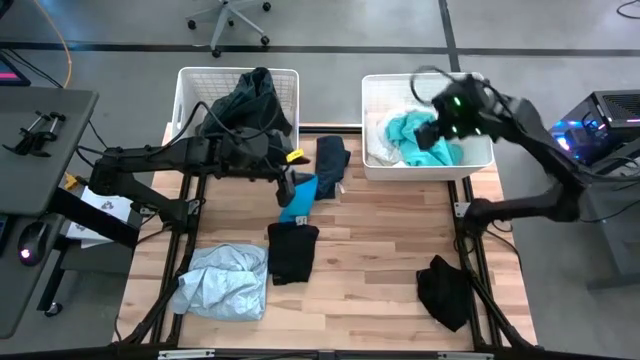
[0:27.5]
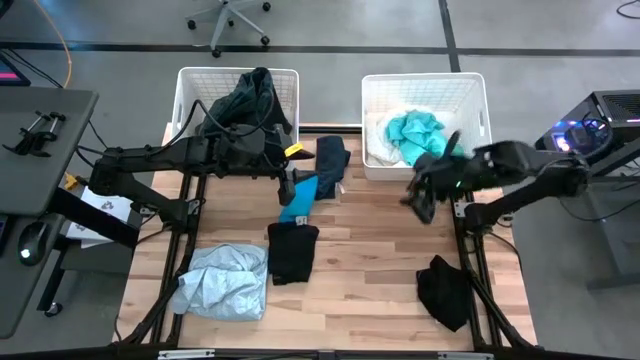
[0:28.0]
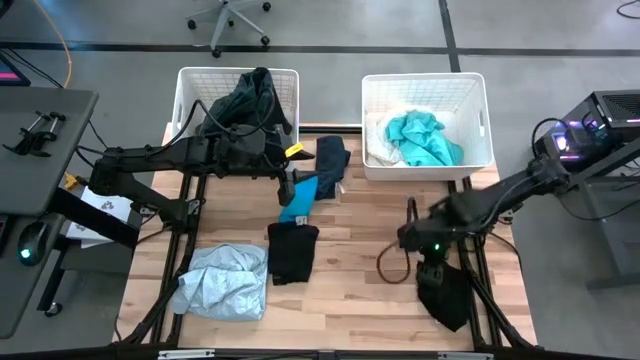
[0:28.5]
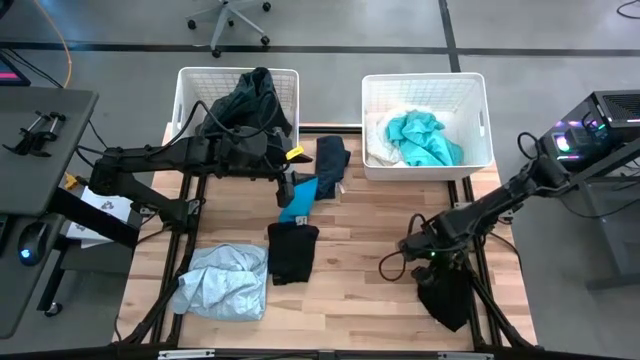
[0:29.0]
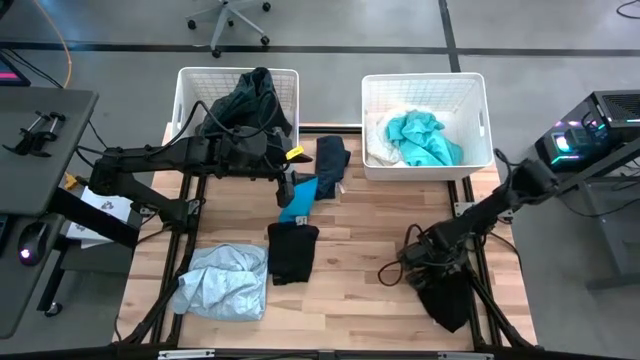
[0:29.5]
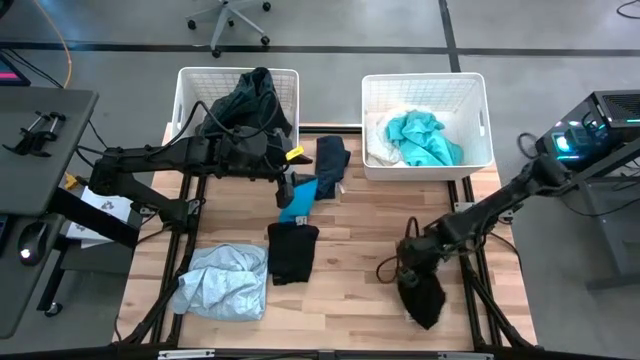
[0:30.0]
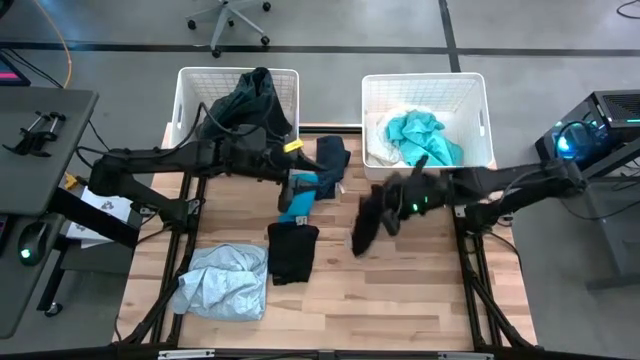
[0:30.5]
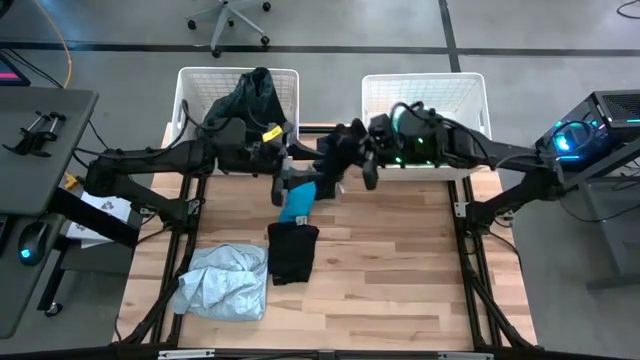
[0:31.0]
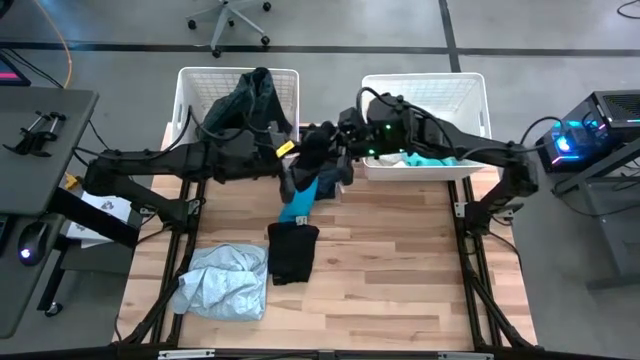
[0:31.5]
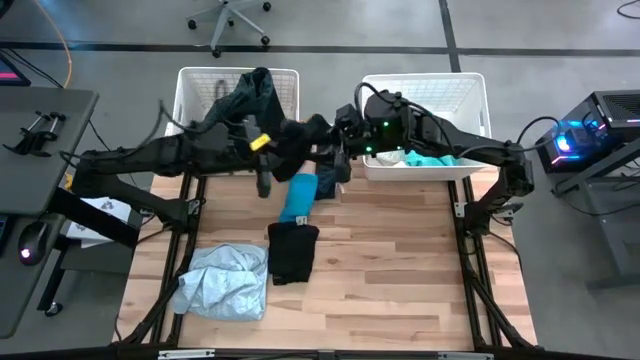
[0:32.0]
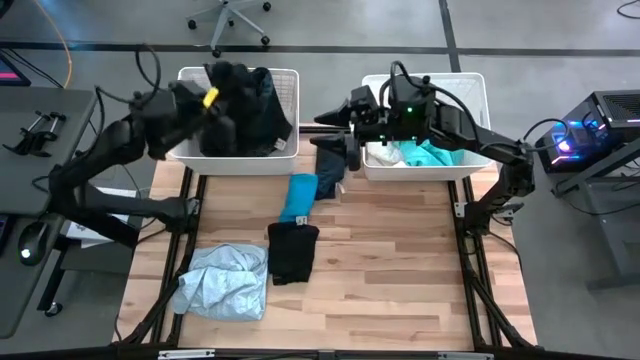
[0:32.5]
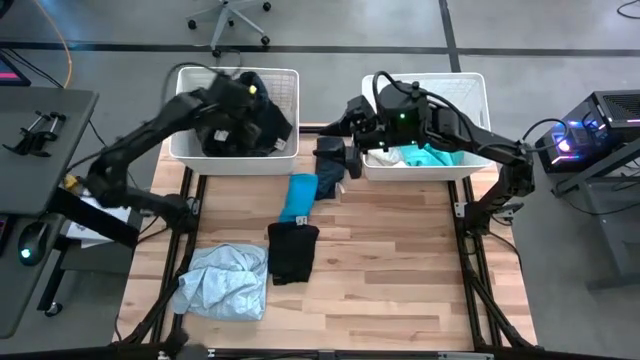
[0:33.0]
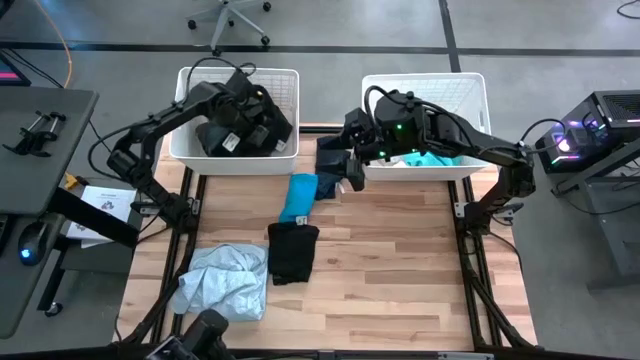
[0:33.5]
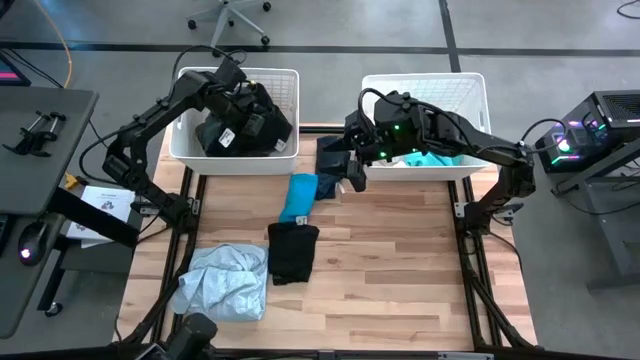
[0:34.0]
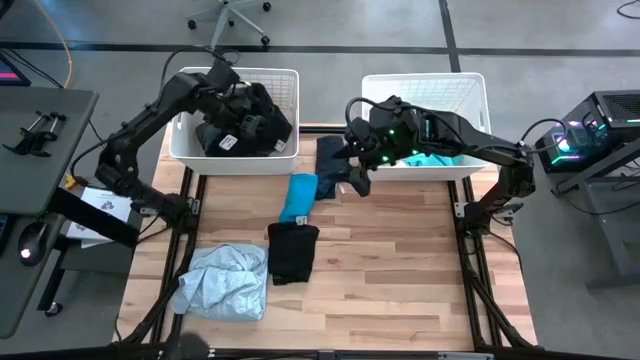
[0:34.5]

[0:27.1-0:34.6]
Task: Sort clothes
Put the black underwear into the left white laundry organizer

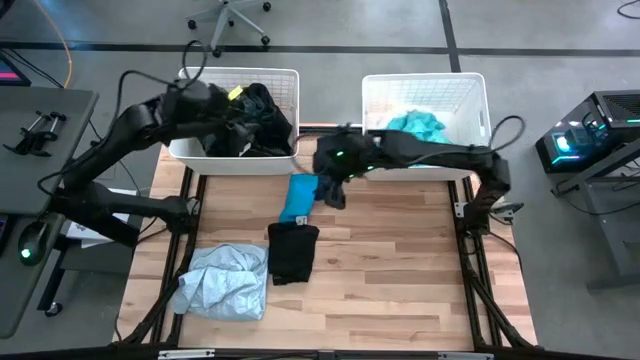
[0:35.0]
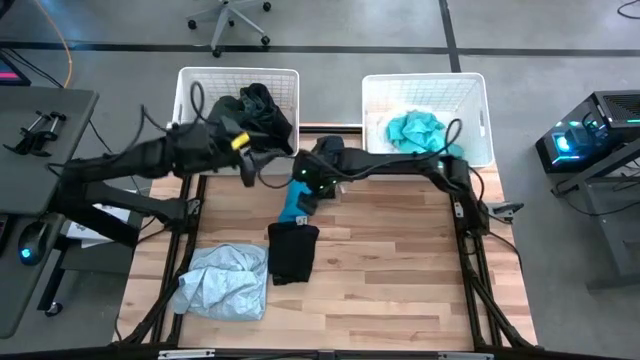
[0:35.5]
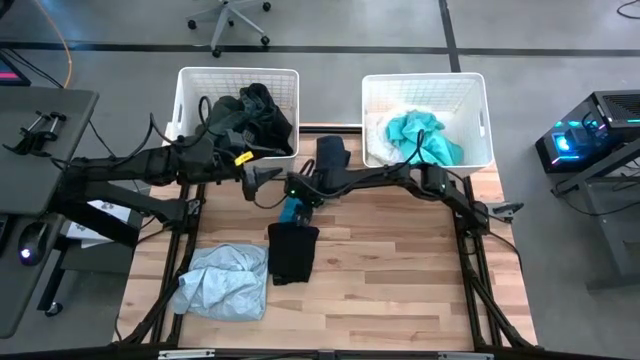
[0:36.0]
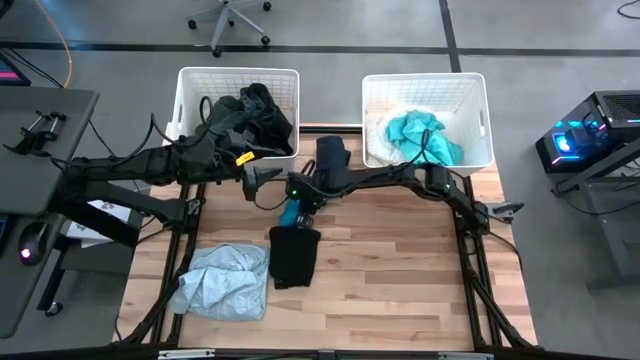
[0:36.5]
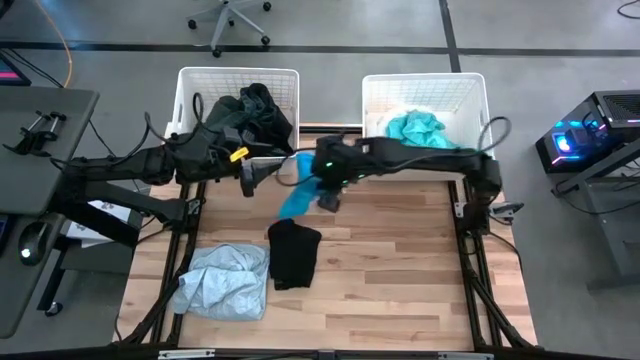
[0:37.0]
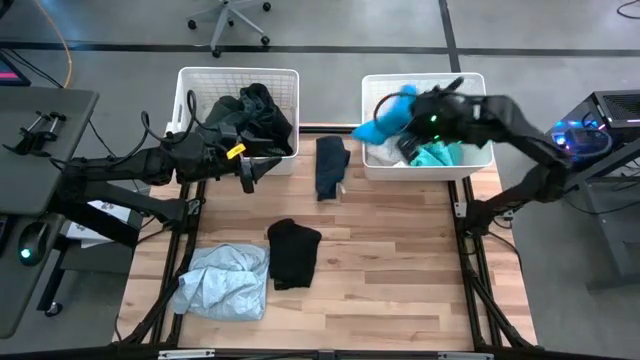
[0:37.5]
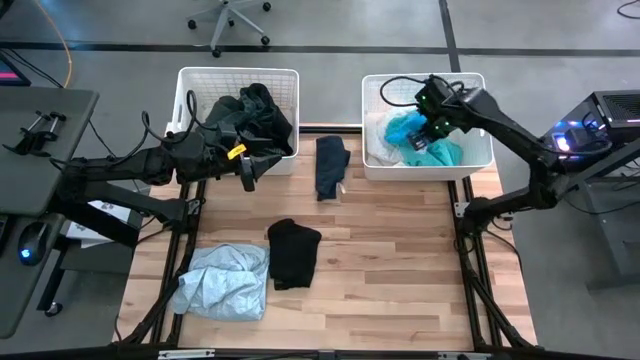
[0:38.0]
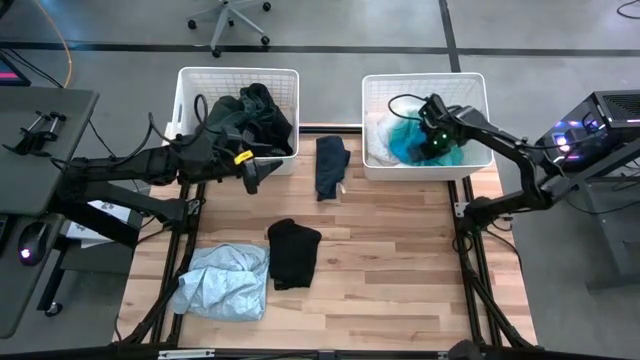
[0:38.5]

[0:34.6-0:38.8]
Put the light blue underwear into the right white laundry organizer

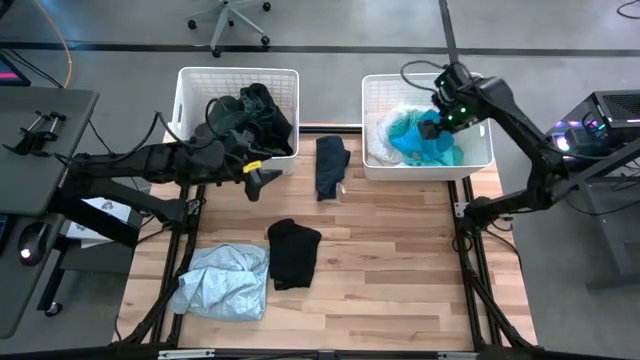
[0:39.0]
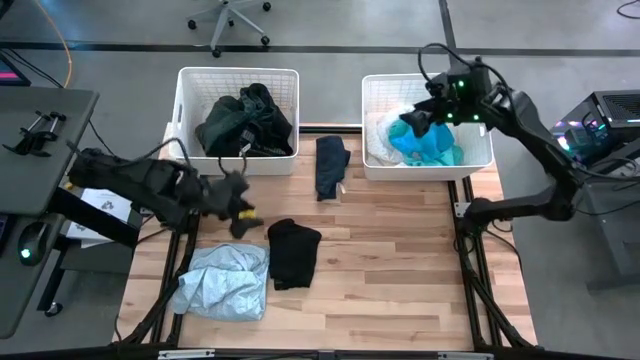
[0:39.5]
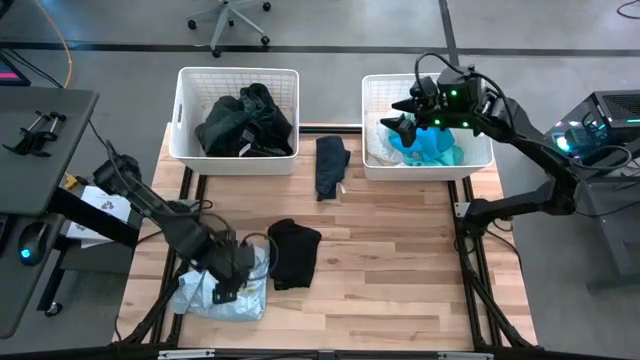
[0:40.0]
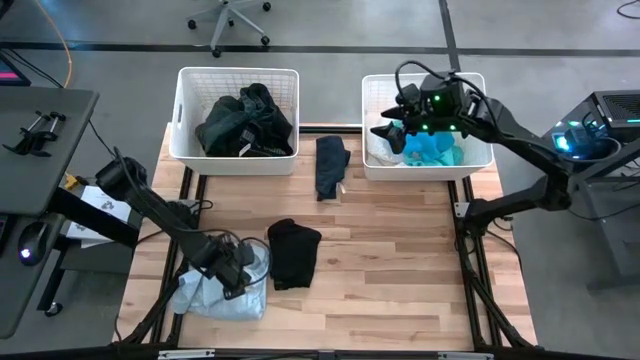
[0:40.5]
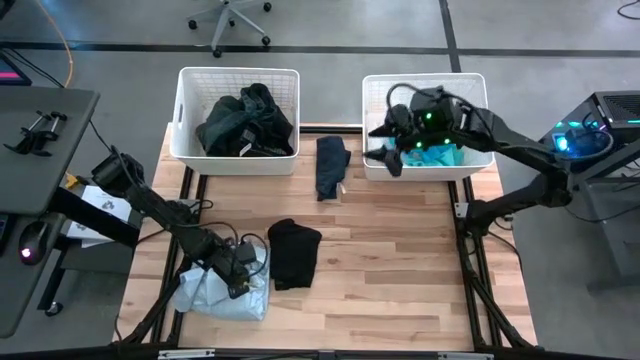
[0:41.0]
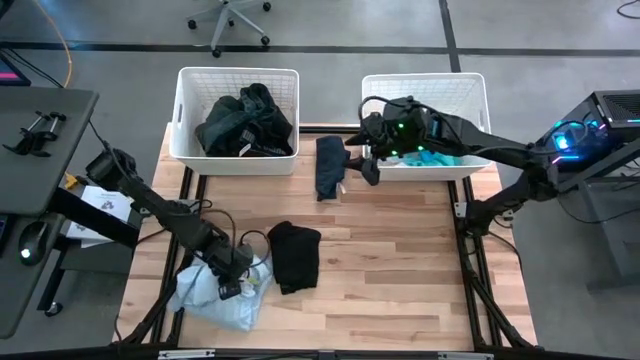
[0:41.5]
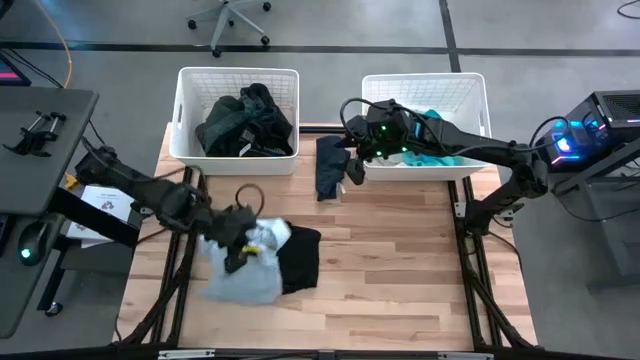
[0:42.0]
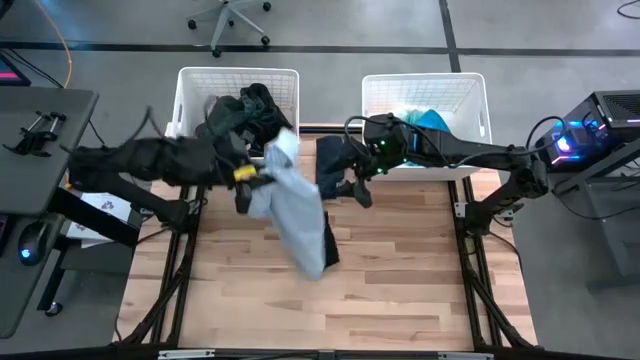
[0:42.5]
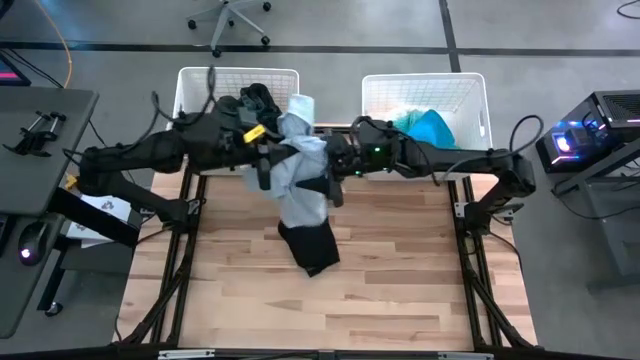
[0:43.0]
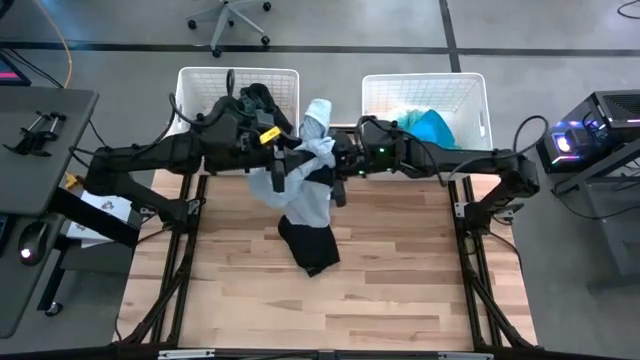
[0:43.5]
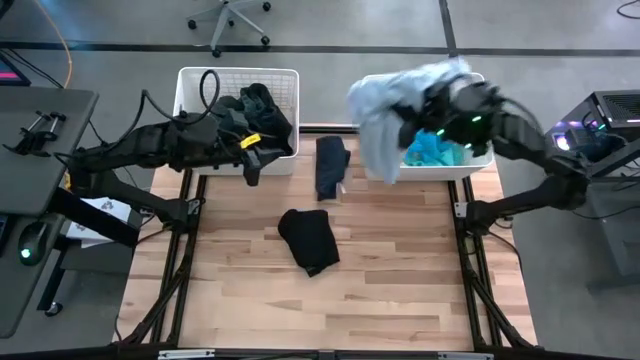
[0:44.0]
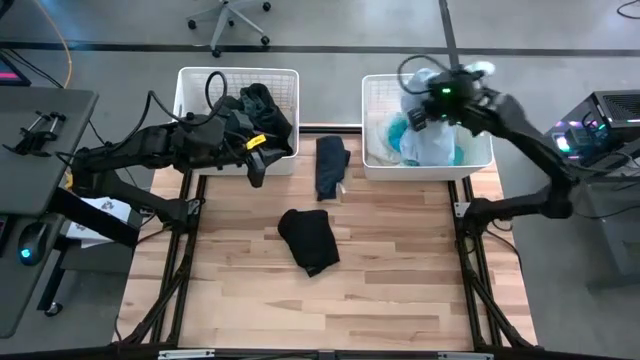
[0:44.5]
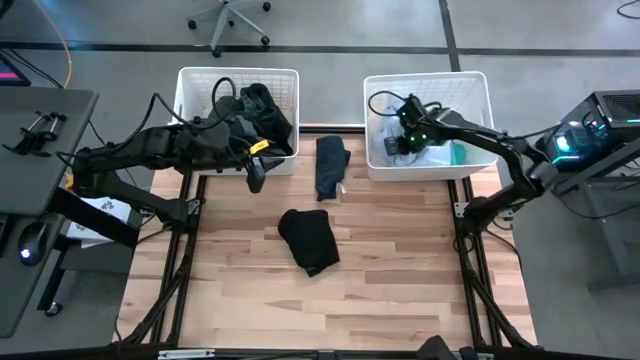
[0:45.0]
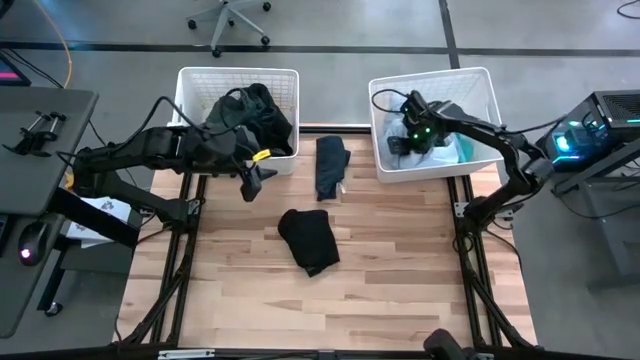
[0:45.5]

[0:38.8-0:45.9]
Put the light blue shirt into the right white laundry organizer

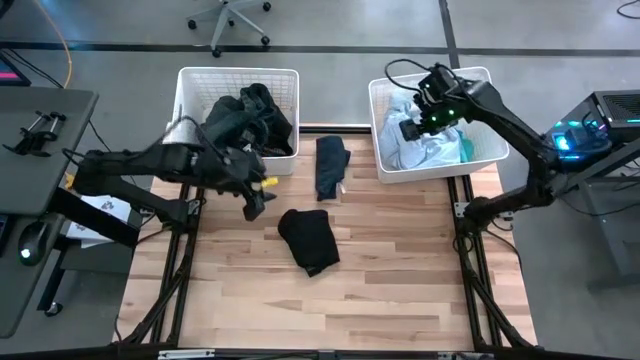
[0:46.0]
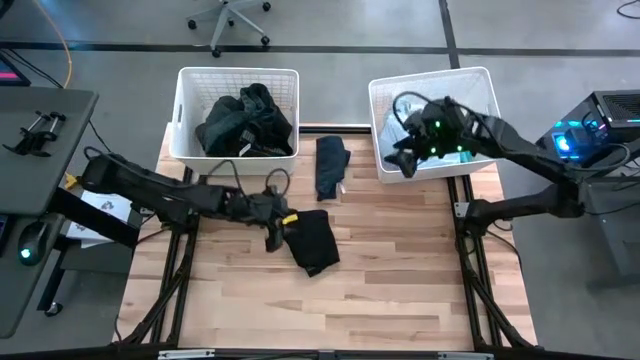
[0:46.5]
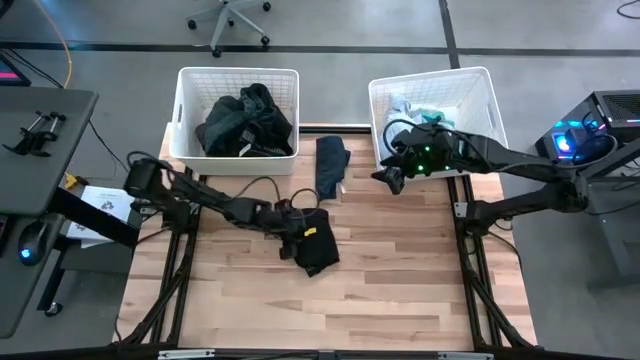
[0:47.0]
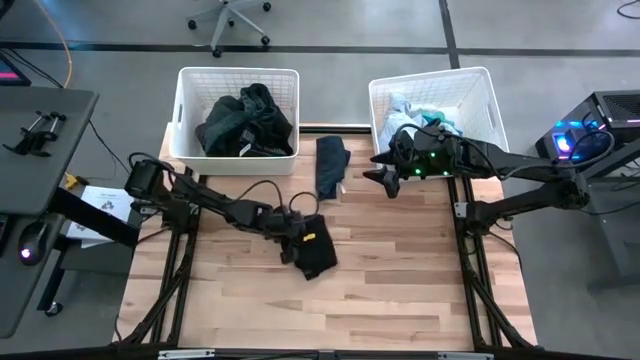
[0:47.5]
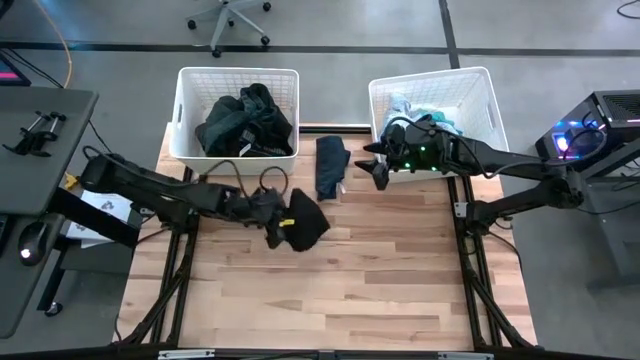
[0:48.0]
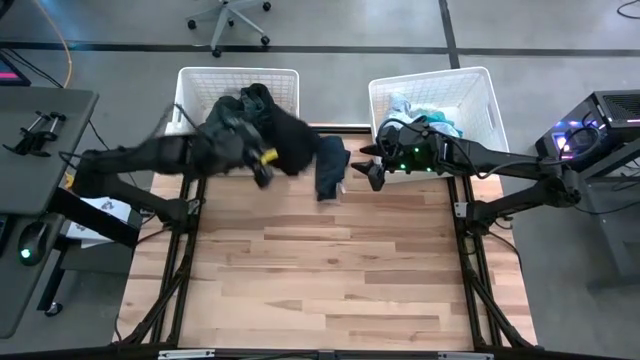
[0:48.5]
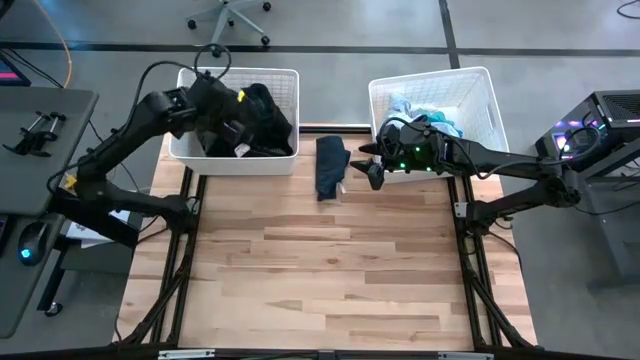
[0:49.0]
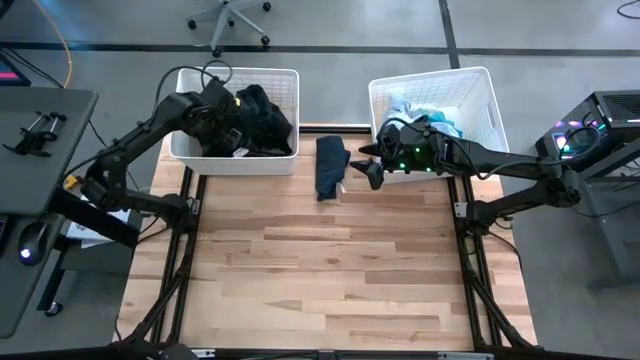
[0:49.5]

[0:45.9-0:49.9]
Put the black shirt into the left white laundry organizer
